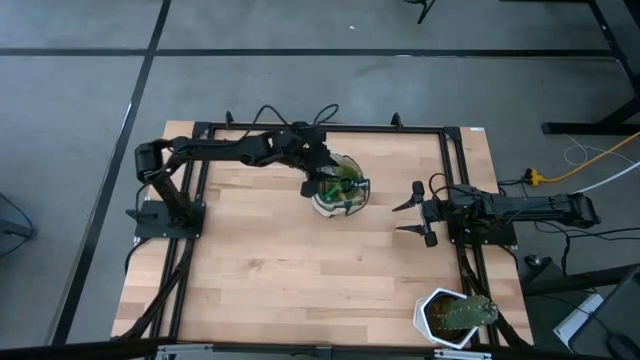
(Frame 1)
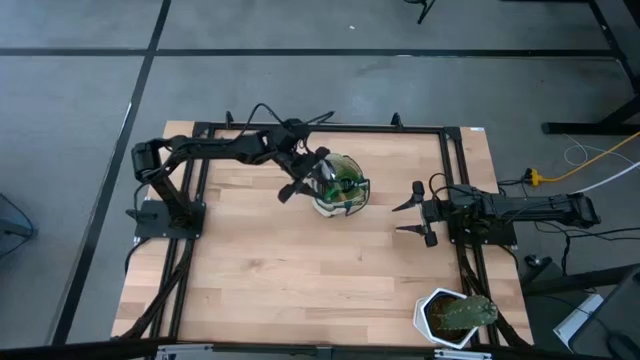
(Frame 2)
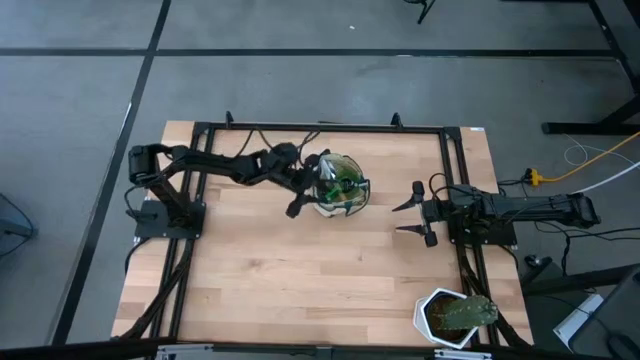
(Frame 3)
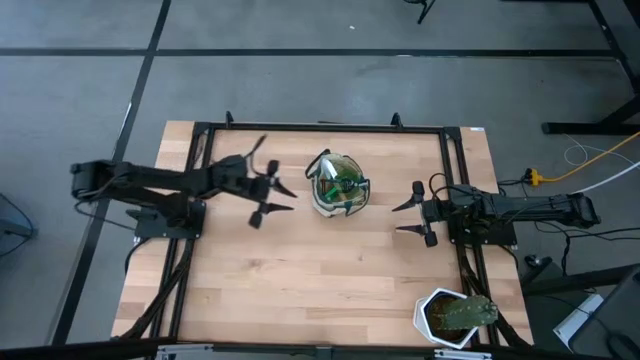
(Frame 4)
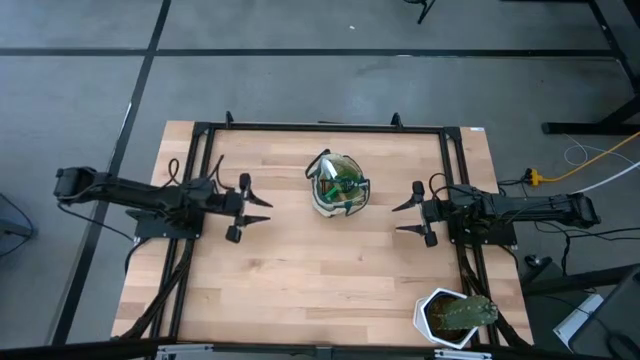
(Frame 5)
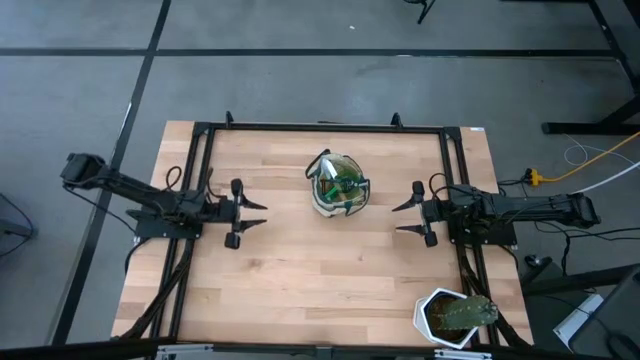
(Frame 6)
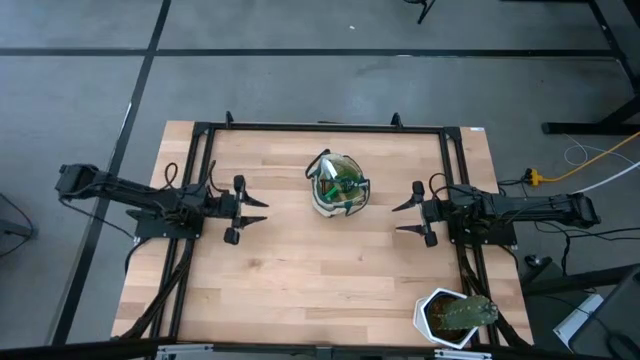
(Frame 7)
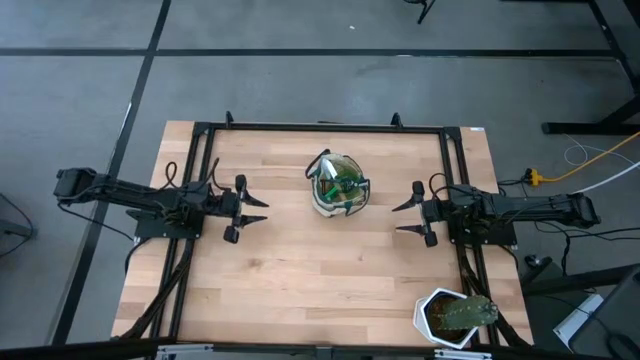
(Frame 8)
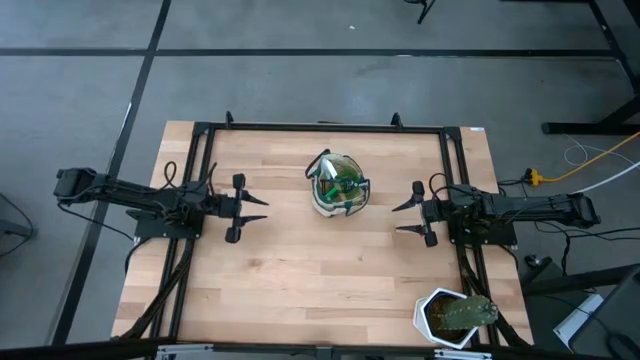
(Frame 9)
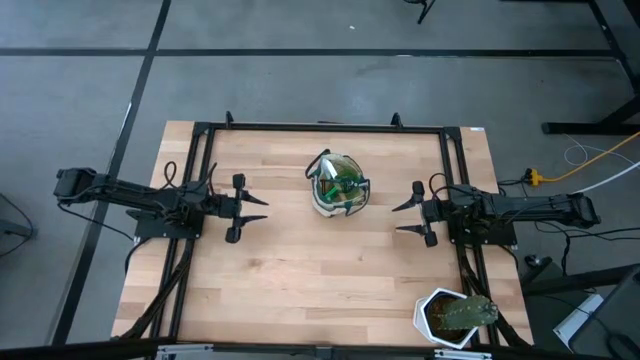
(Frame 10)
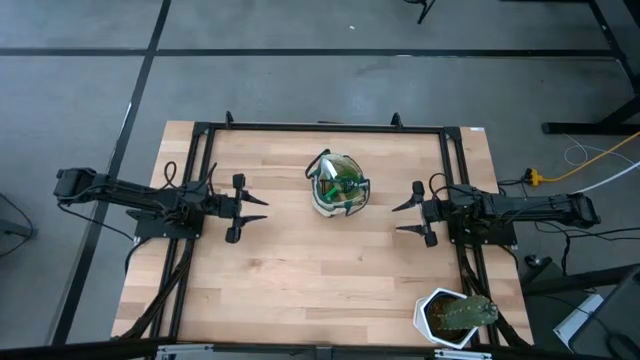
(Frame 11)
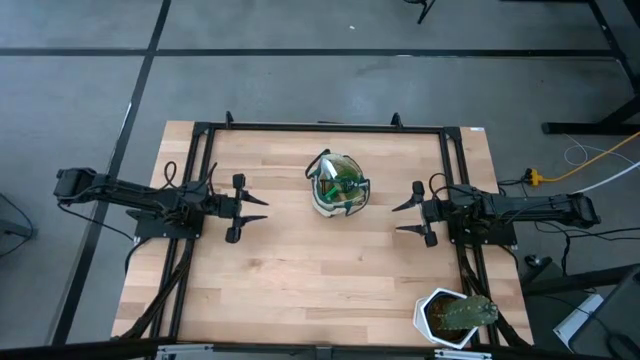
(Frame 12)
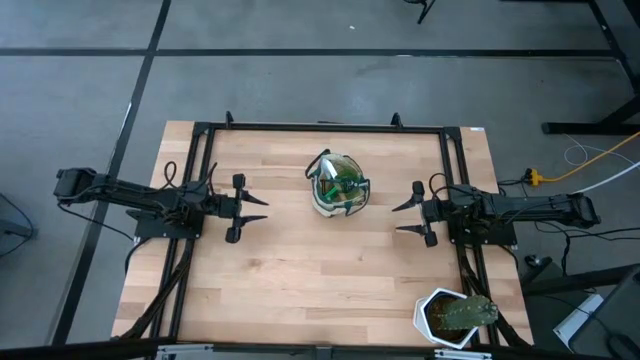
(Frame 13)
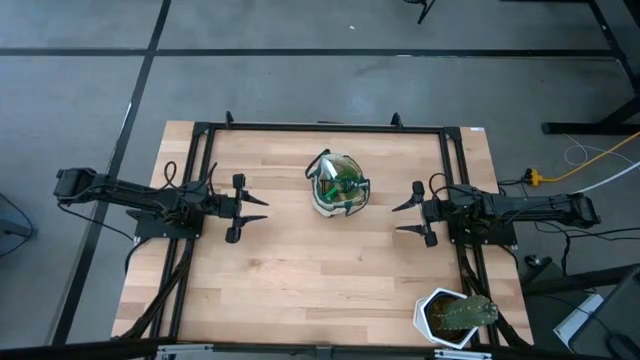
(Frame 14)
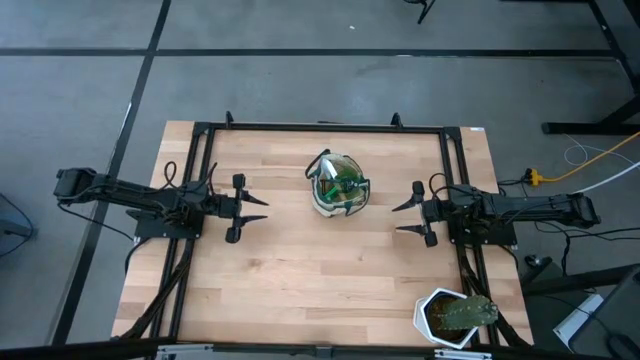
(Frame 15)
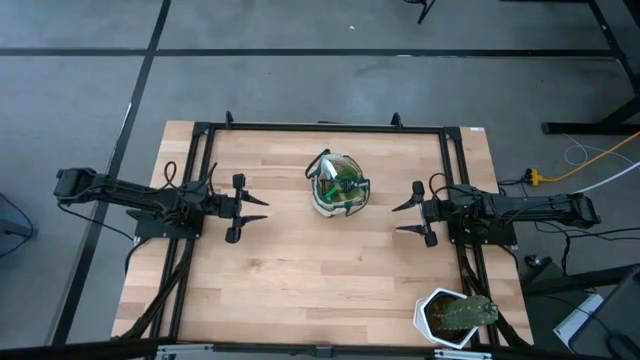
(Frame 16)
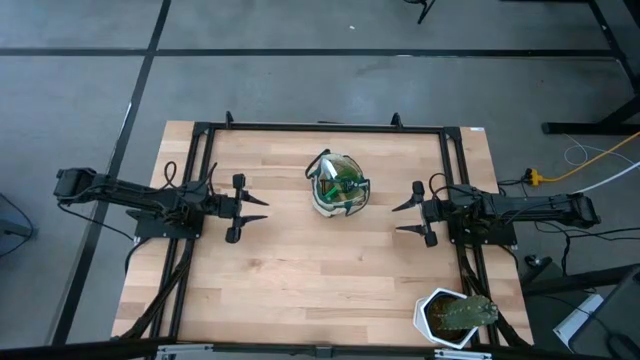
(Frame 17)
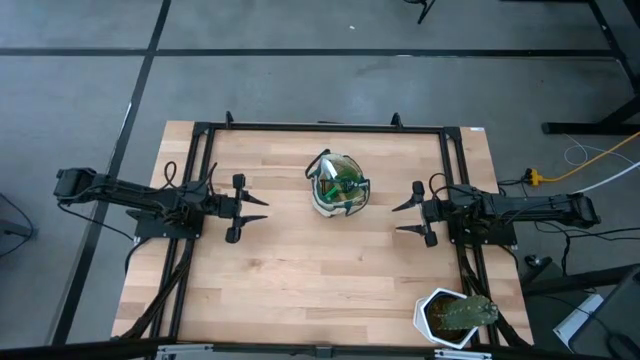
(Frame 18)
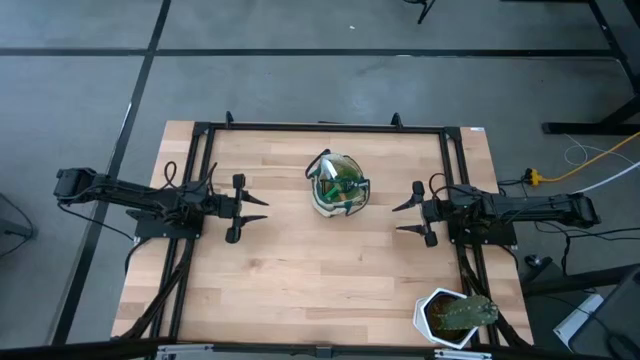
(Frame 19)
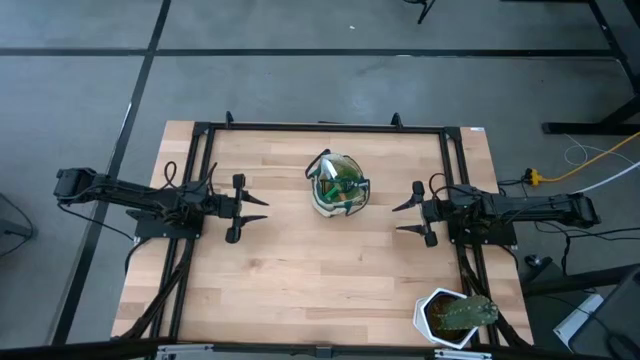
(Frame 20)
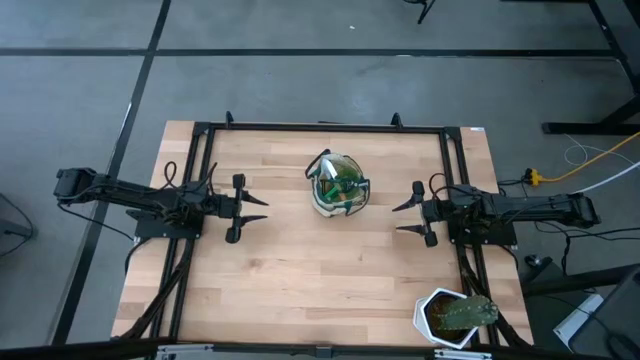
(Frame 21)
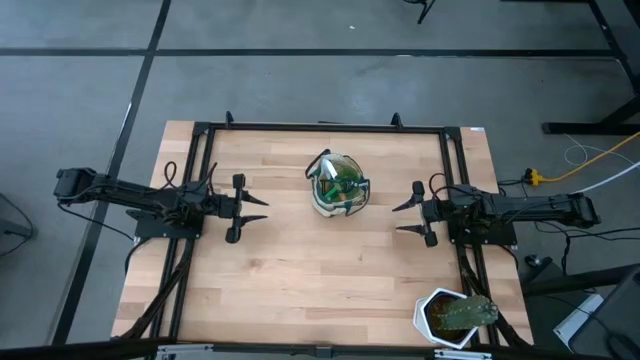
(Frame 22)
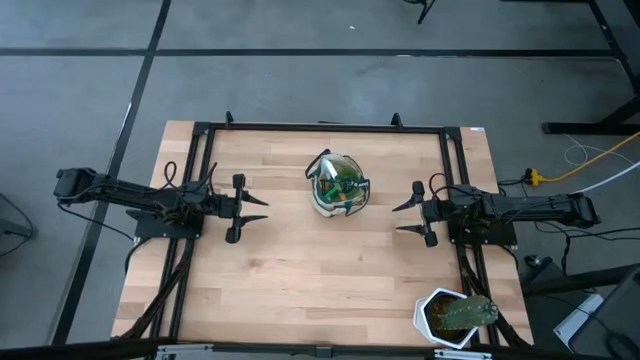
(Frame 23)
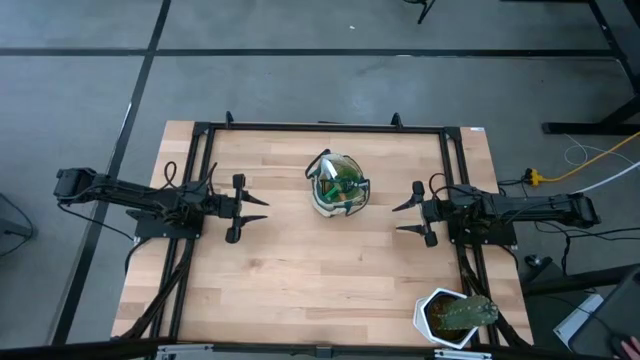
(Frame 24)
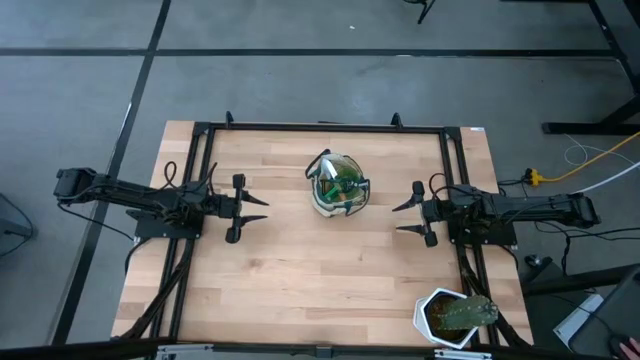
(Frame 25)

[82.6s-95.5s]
Task: Pick & Place Garden tools in Gardening bag
Return to Home Position

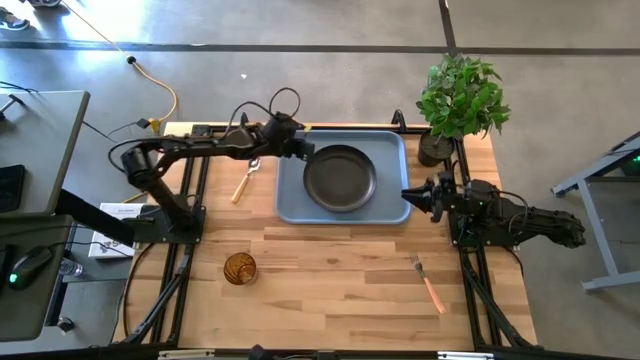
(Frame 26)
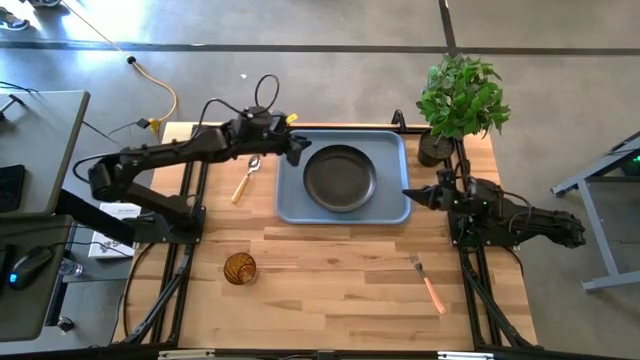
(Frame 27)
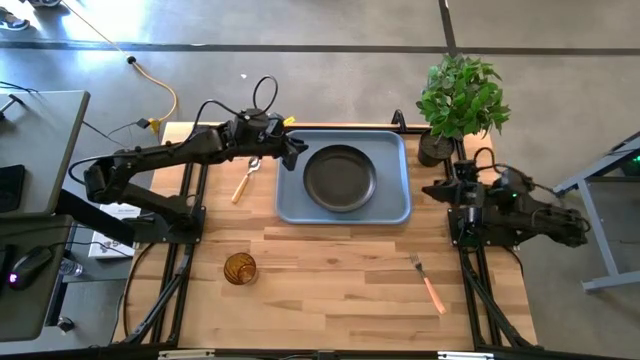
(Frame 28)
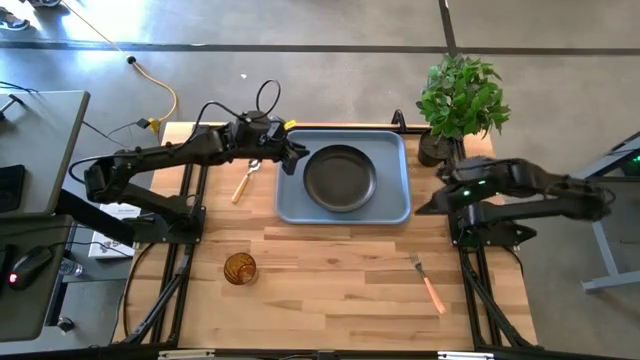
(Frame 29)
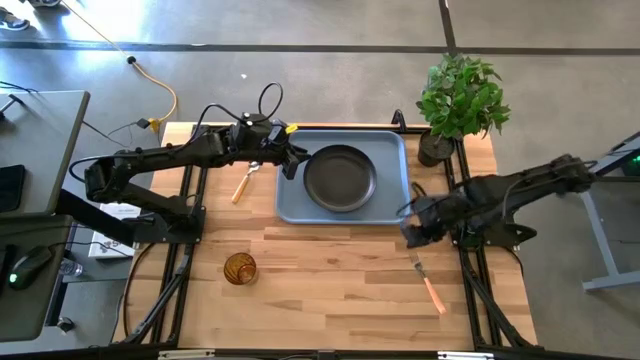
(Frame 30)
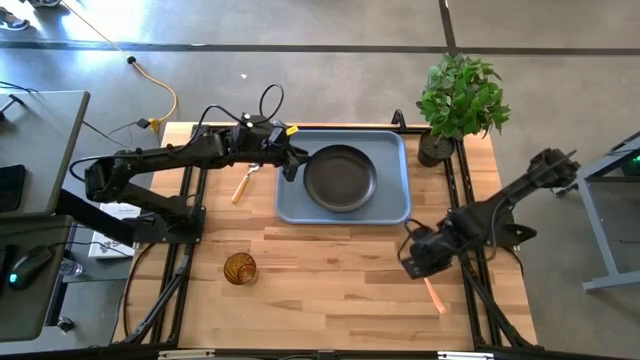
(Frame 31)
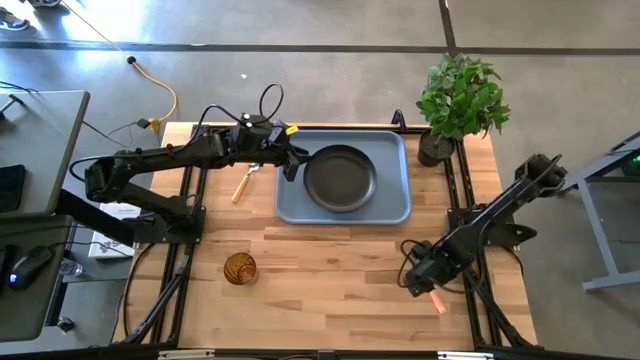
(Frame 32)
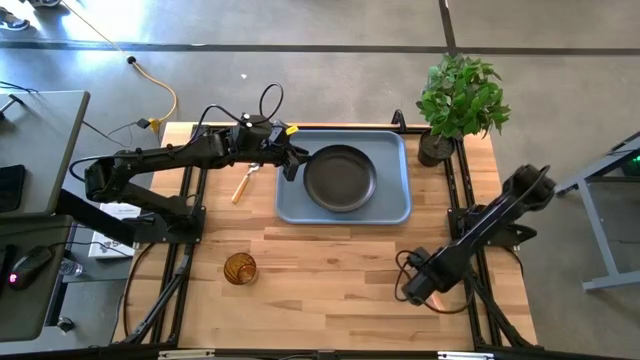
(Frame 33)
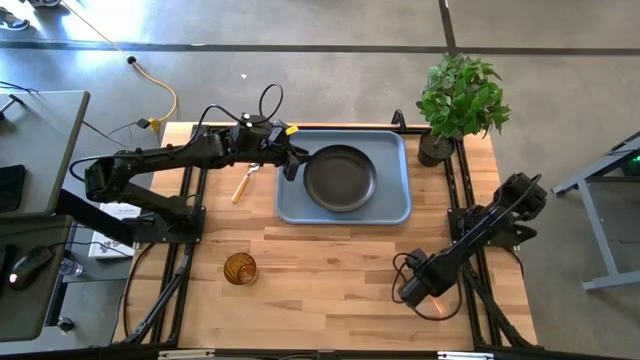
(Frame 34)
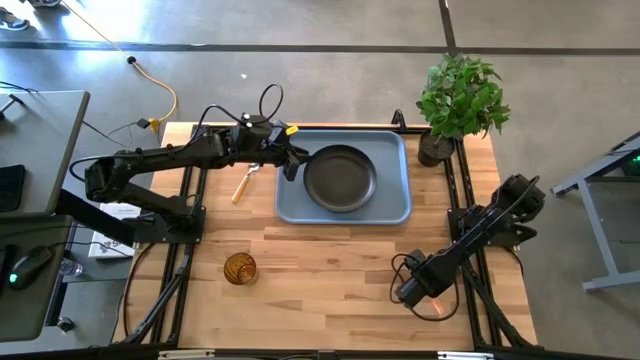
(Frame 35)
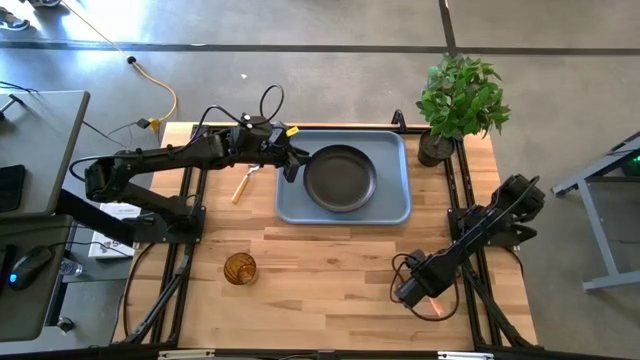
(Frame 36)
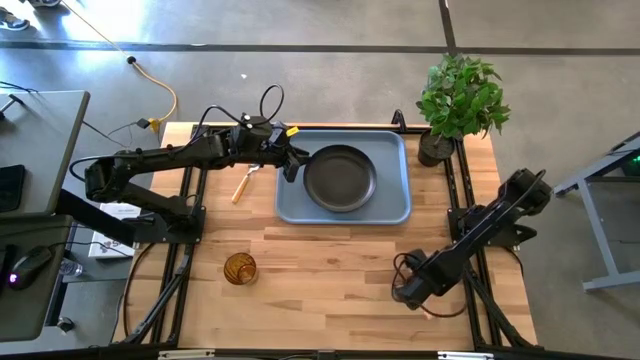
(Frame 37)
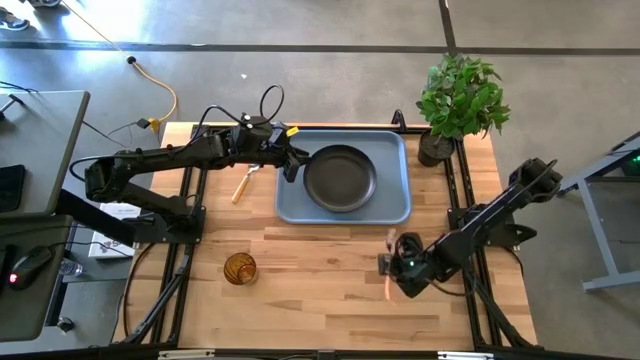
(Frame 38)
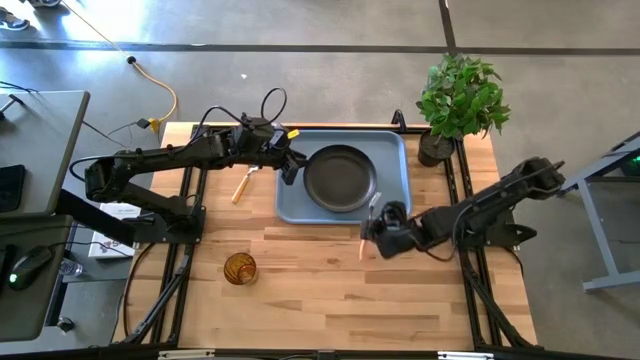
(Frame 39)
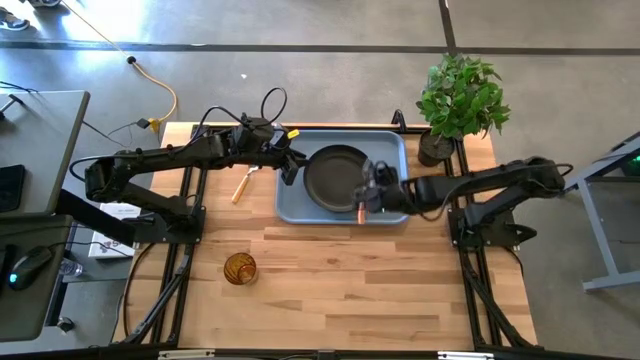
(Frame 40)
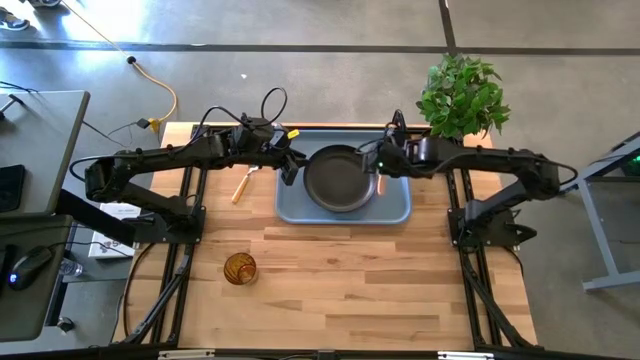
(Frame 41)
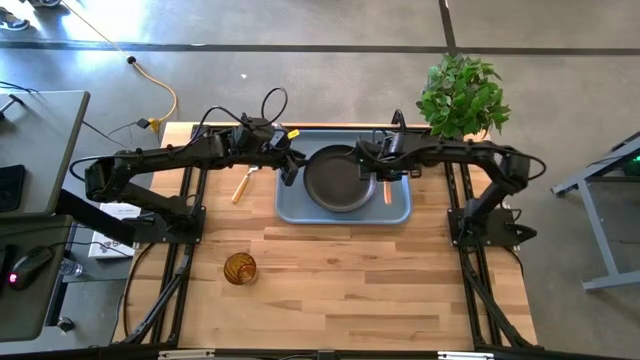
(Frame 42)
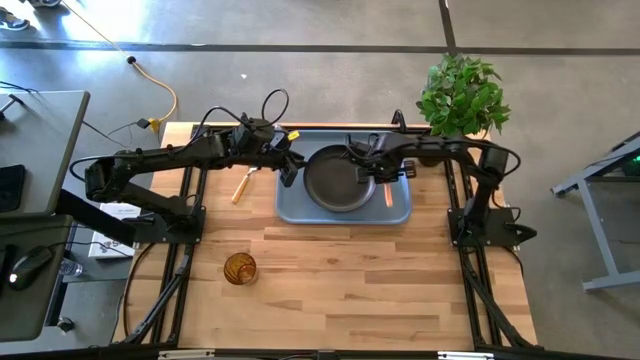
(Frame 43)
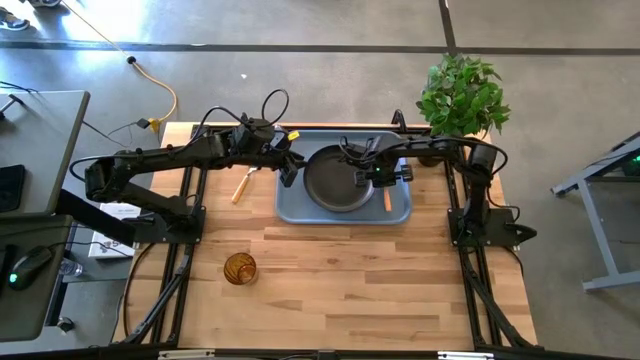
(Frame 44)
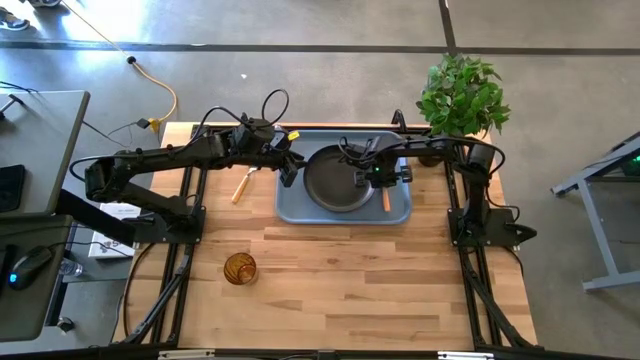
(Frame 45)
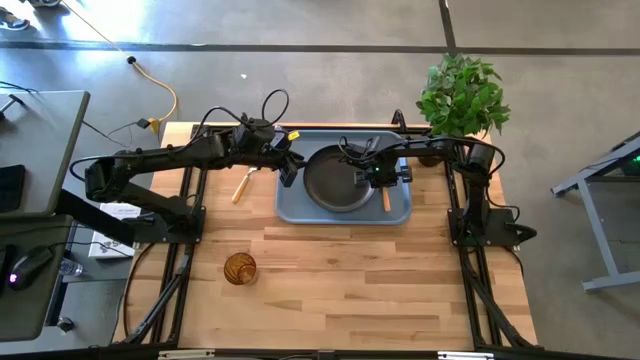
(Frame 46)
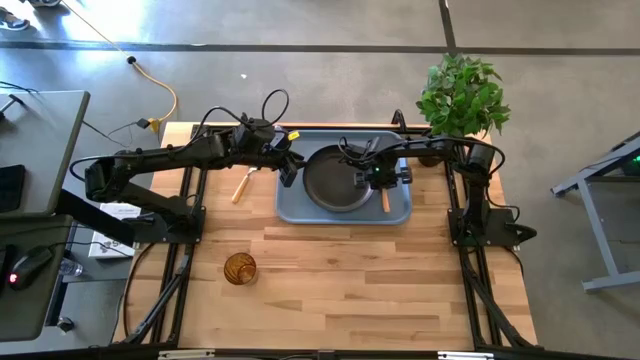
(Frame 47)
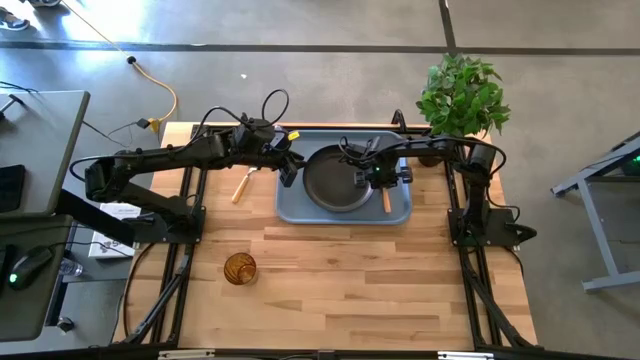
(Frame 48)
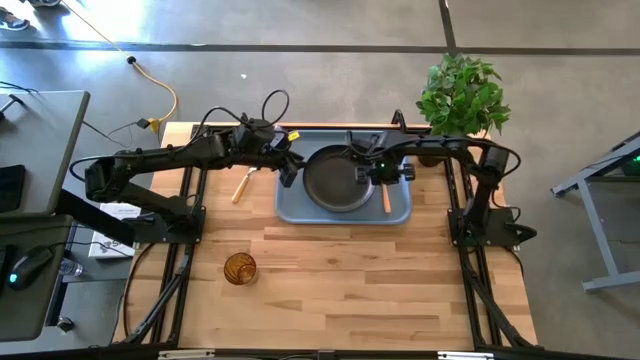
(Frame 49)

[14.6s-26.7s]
Task: Pick and place plate/cup/fork/spoon on tray
Put the light orange fork on the blue tray
